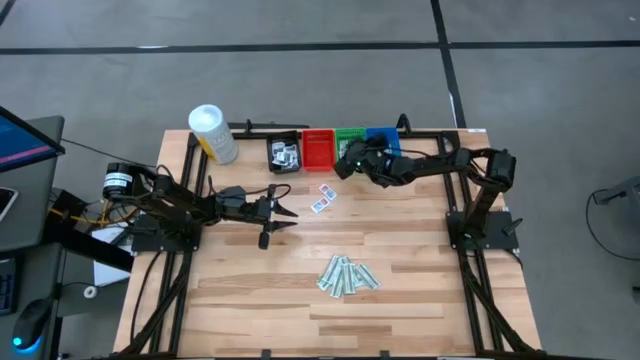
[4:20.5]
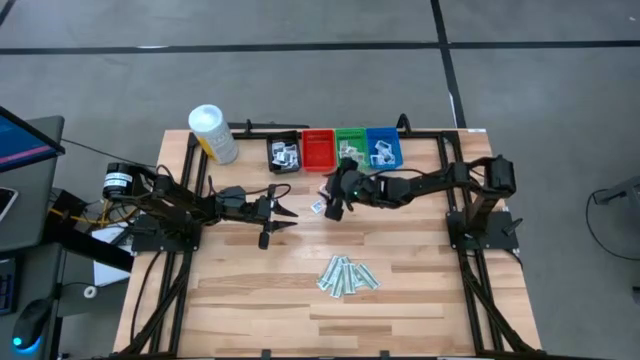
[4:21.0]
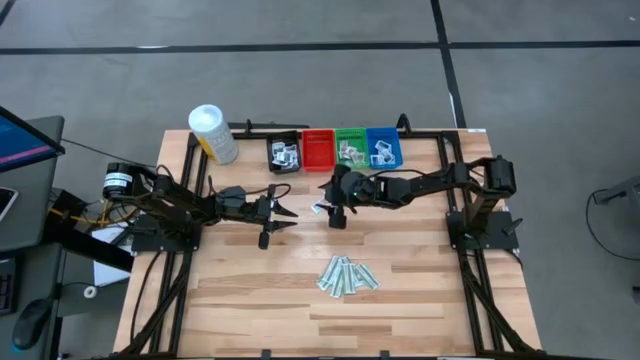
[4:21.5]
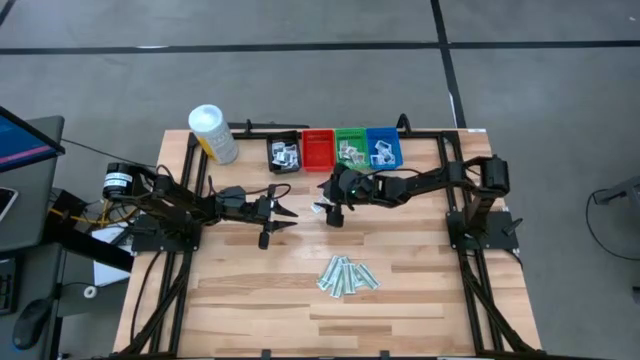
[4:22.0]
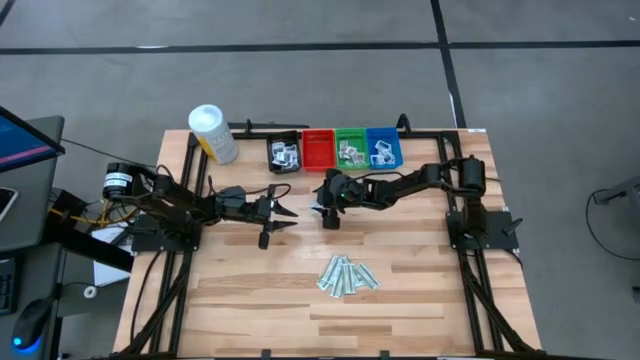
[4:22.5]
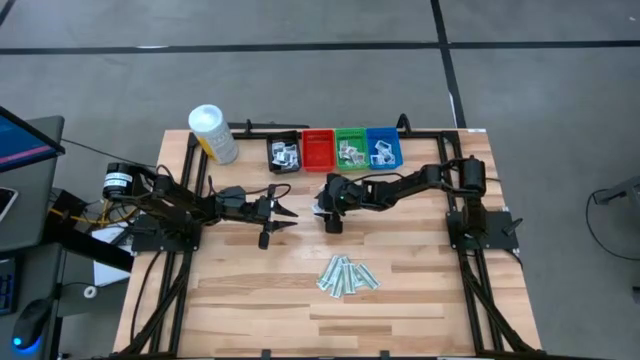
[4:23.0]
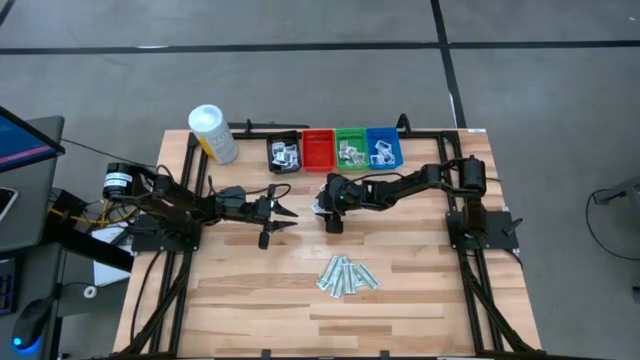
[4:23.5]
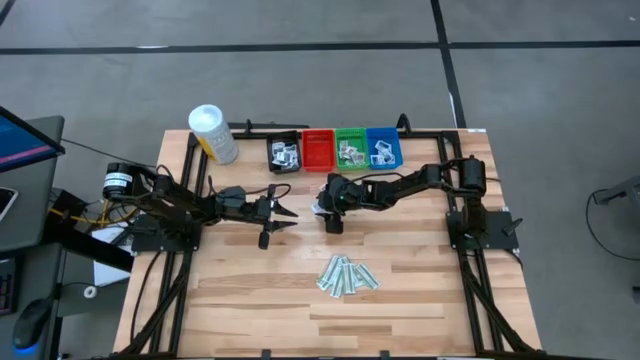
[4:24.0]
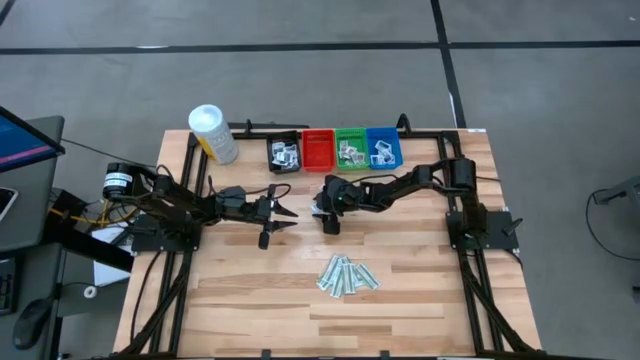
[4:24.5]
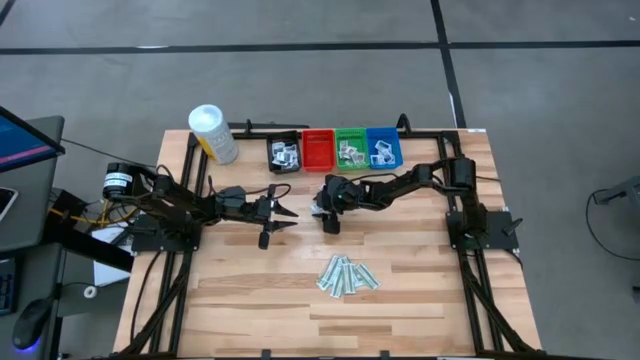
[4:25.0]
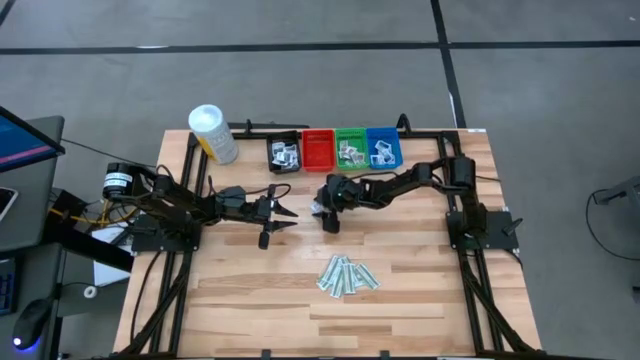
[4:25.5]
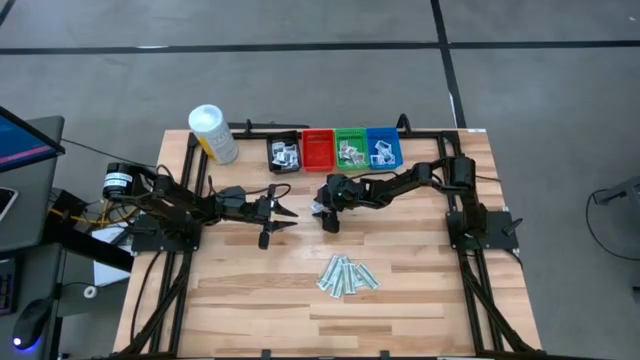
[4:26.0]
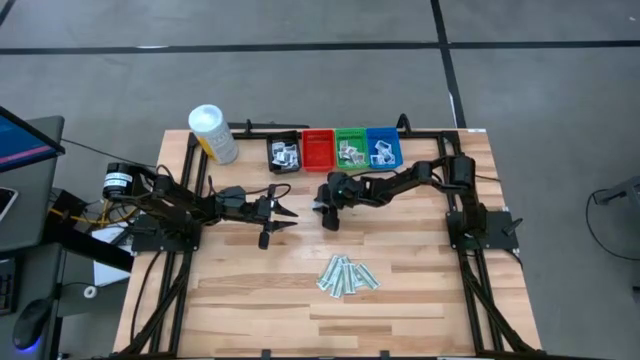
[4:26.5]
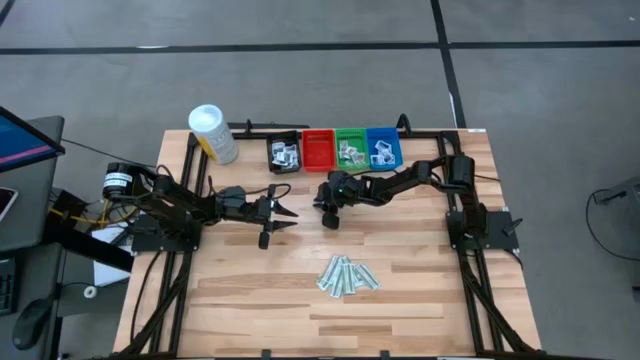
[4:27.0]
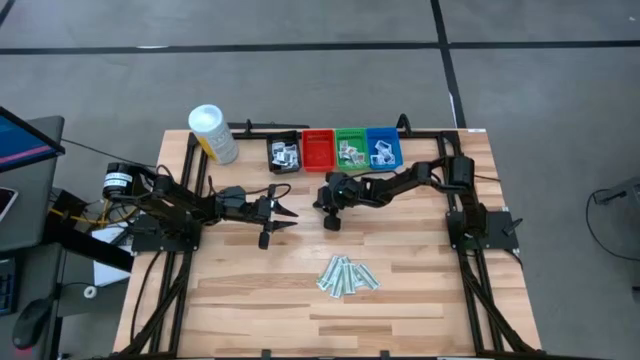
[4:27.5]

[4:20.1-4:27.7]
Task: Pick & Place First Aid Supplies
Put the orange ointment pack into the green bin

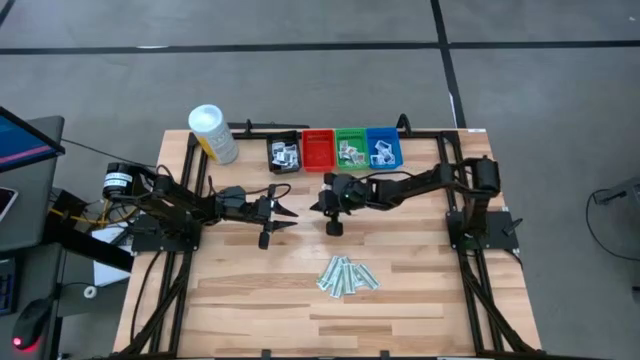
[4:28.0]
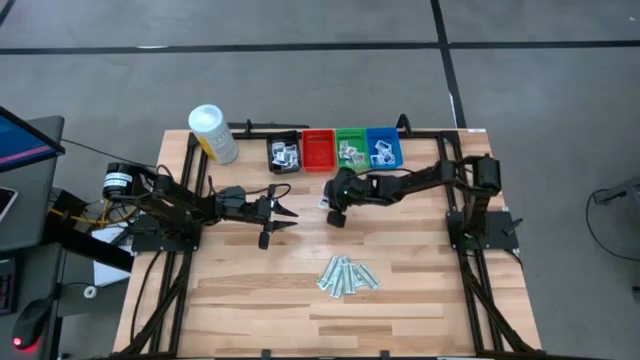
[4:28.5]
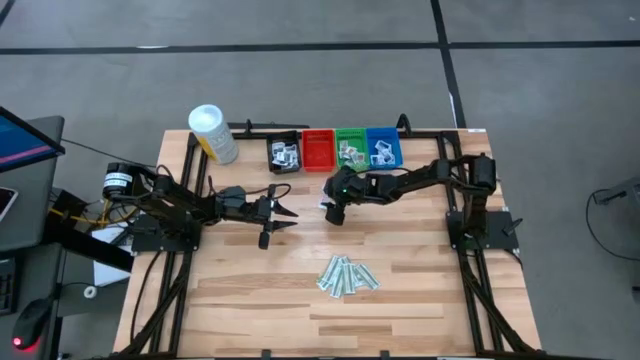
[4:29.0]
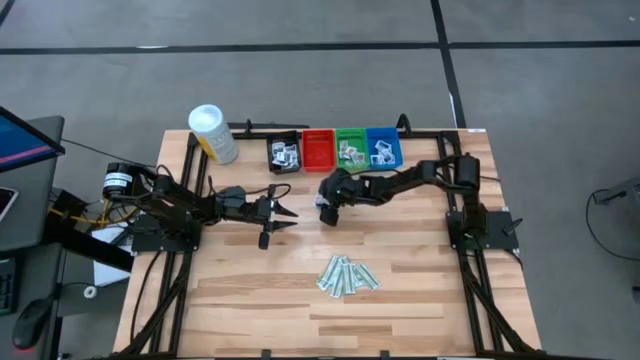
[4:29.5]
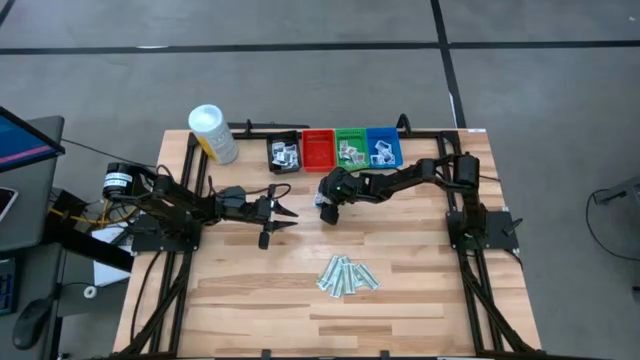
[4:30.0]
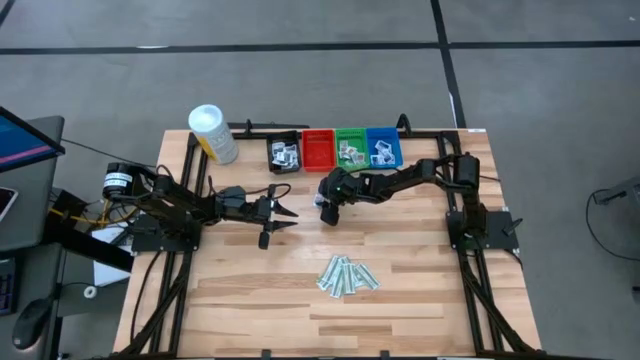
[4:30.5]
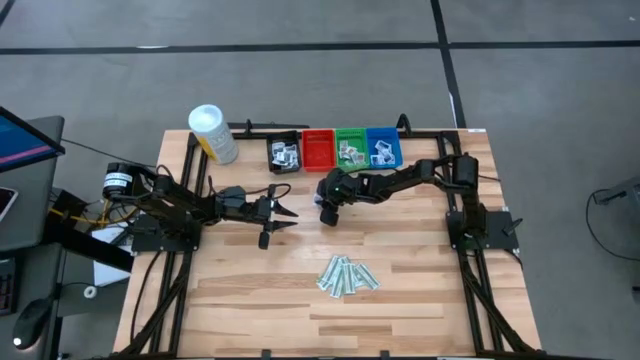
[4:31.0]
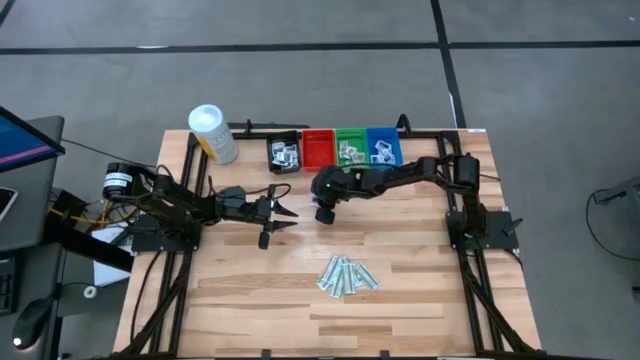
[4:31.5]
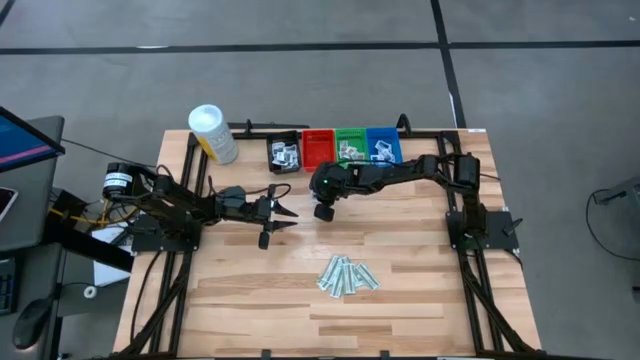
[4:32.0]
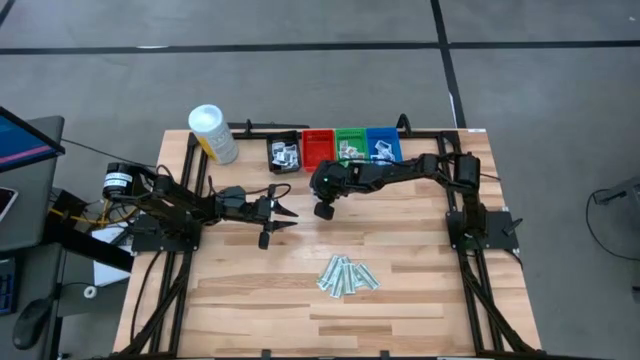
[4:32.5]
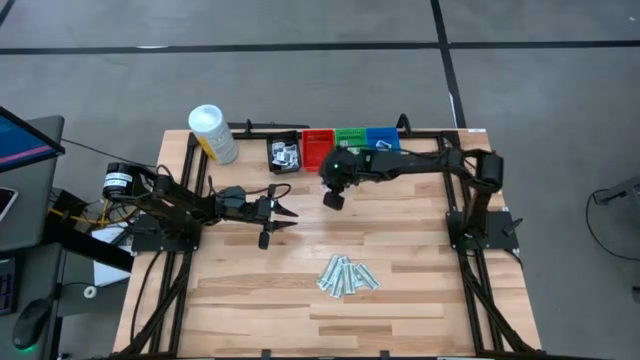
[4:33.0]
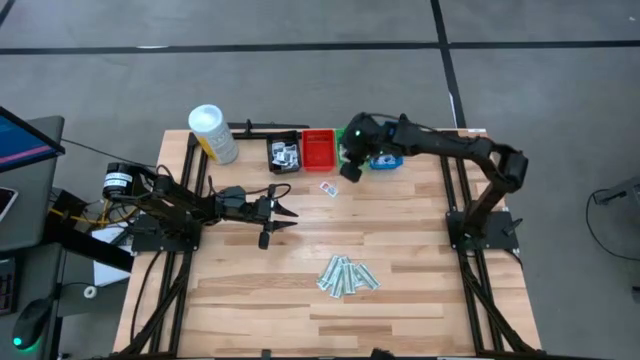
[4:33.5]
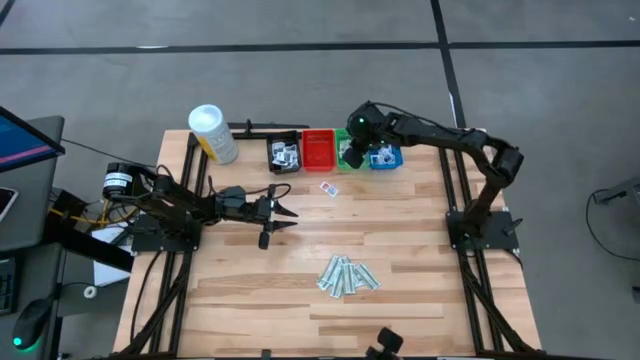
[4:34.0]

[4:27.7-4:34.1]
Put the orange ointment pack into the green bin

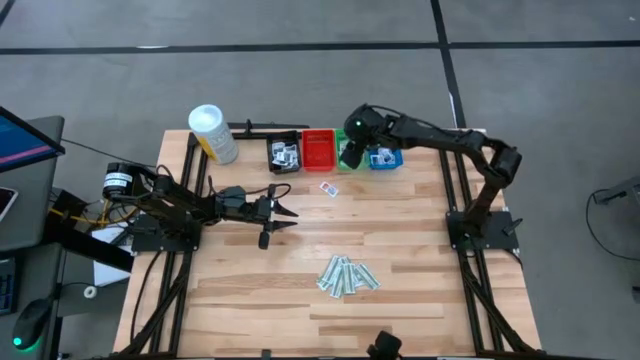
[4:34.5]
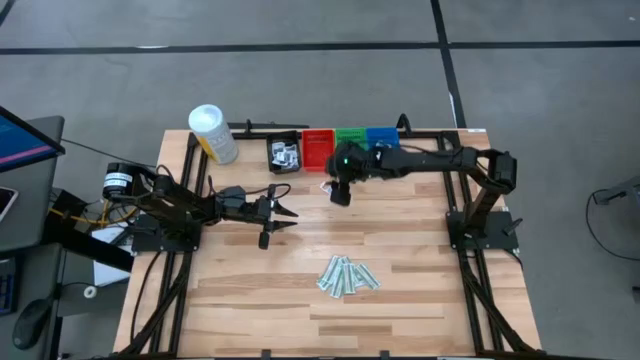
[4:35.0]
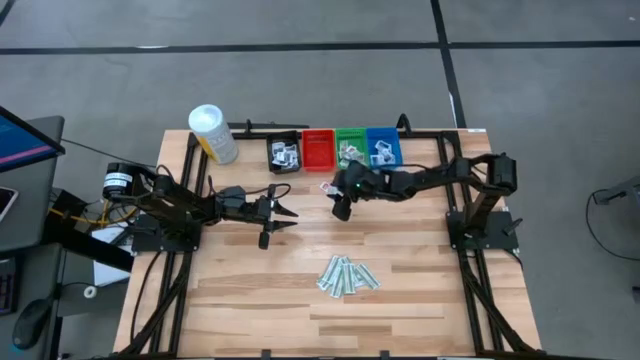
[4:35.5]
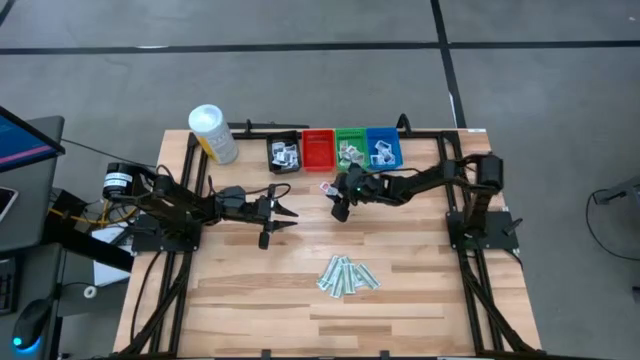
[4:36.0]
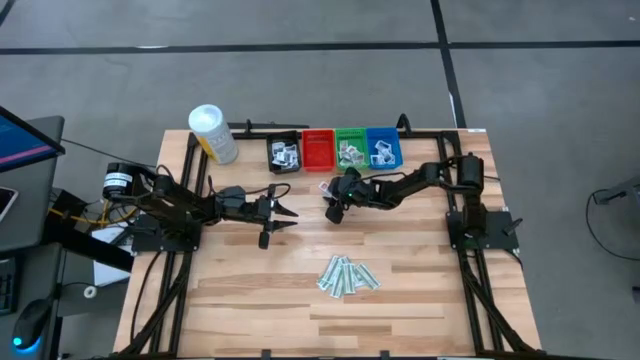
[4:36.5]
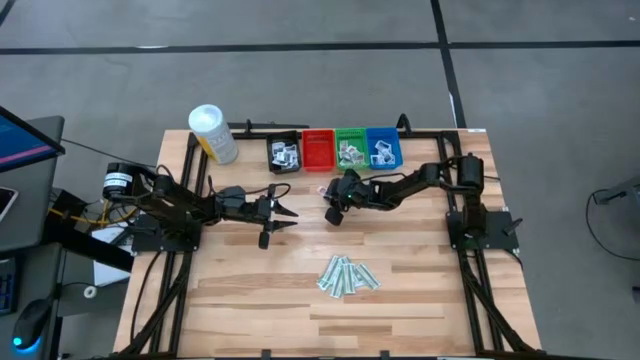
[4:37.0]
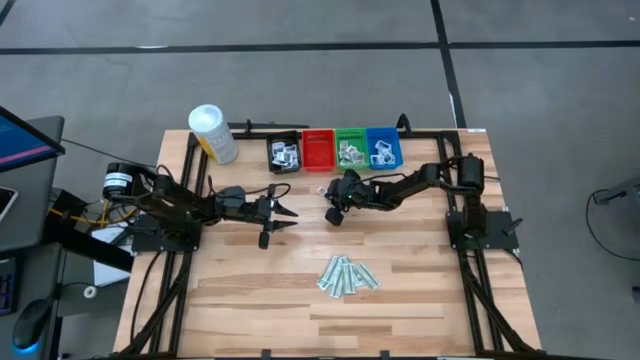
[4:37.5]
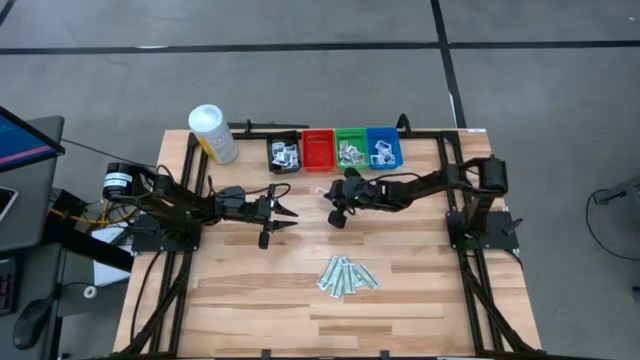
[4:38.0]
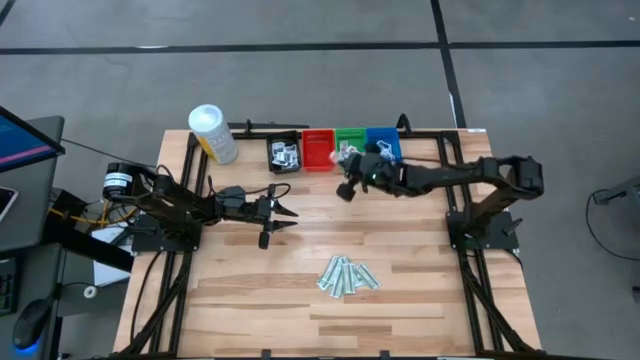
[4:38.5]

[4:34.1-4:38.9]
Put the orange ointment pack into the green bin

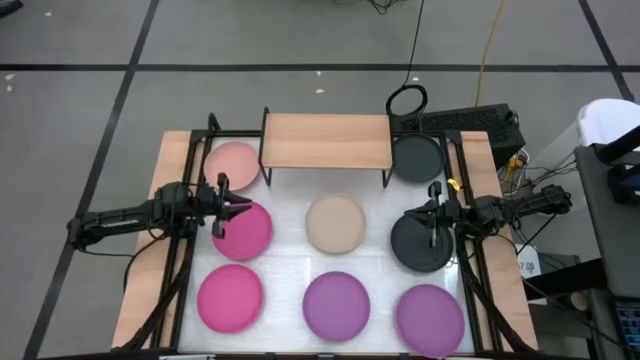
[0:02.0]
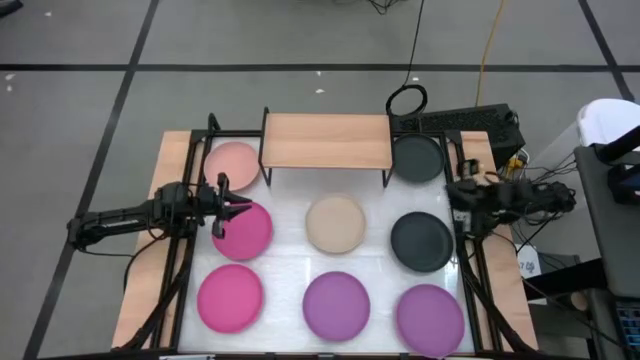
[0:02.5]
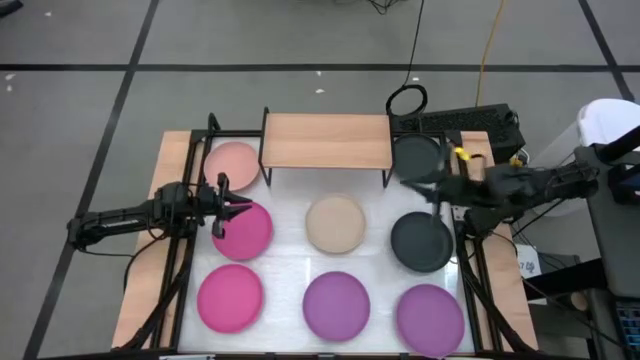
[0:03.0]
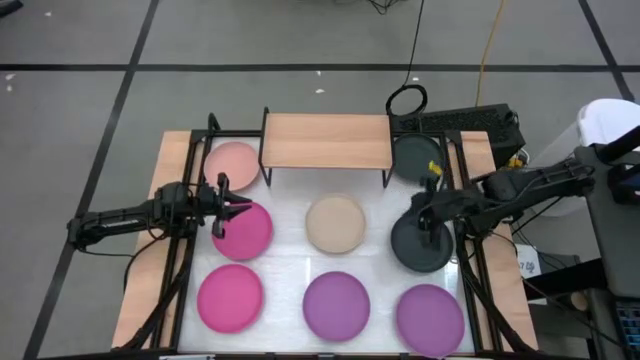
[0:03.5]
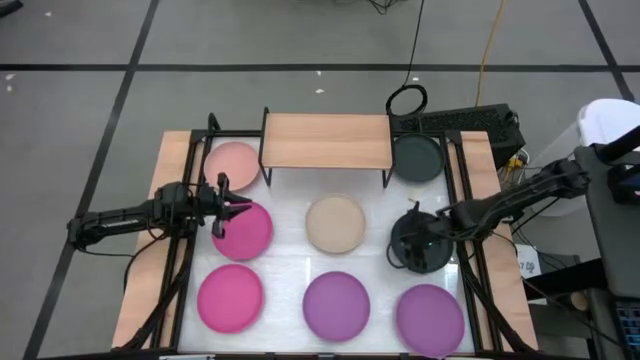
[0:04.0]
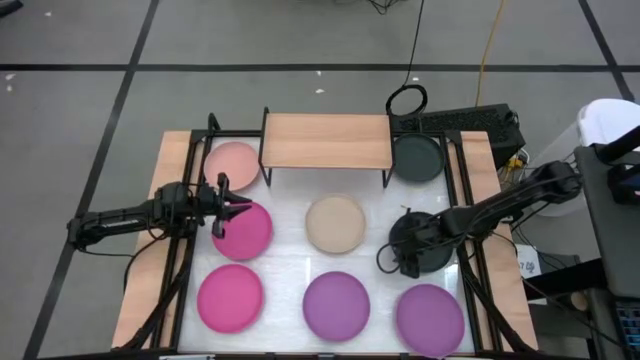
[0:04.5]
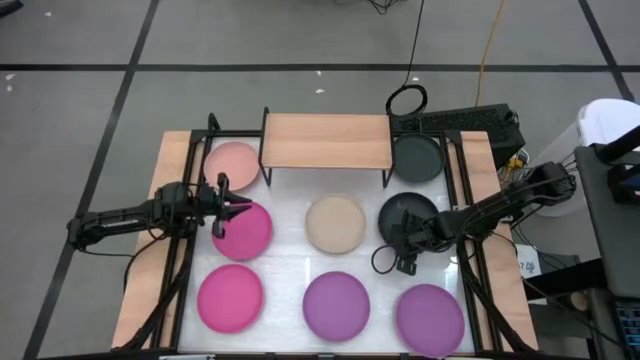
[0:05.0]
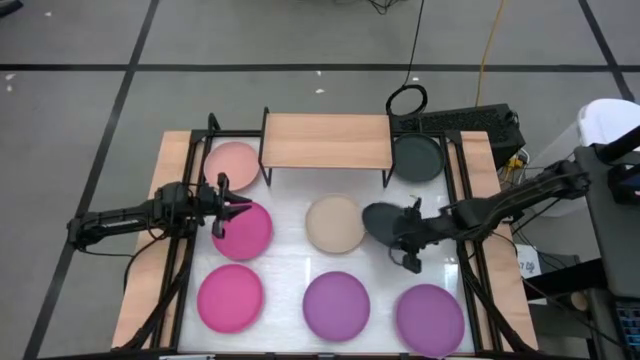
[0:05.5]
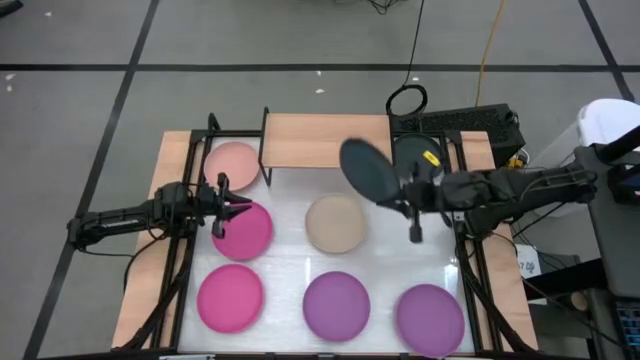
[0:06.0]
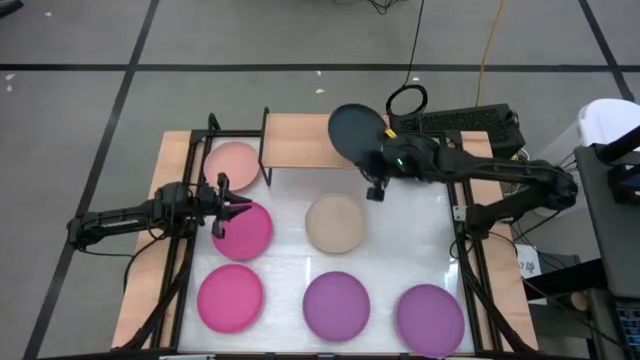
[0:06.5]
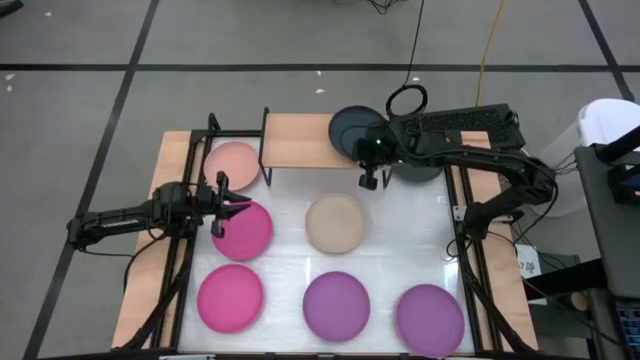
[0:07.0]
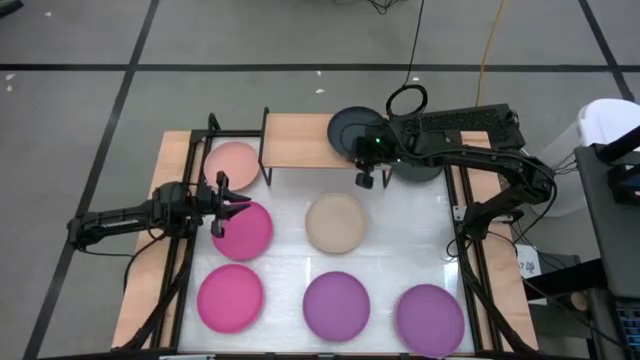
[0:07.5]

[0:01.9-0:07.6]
Task: Place and stack plates onto a shelf
Put the bottom black plate on the shelf
